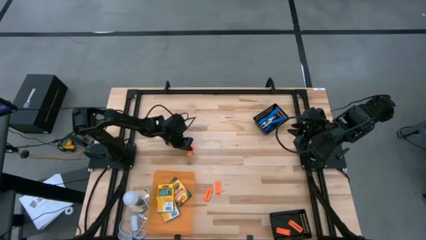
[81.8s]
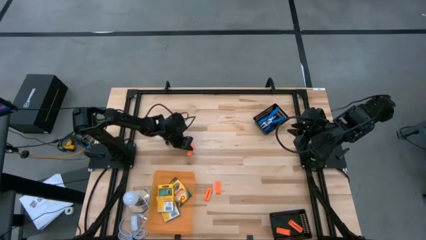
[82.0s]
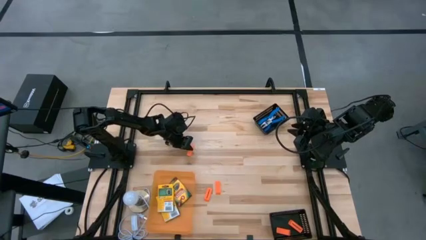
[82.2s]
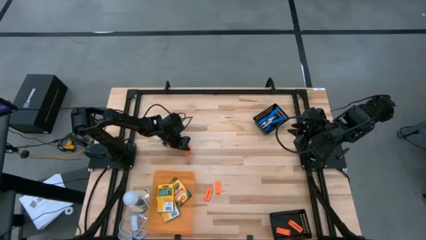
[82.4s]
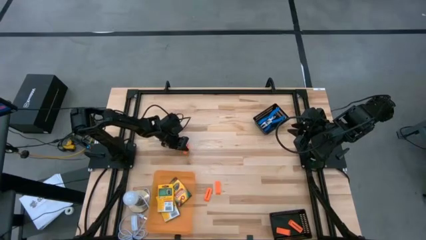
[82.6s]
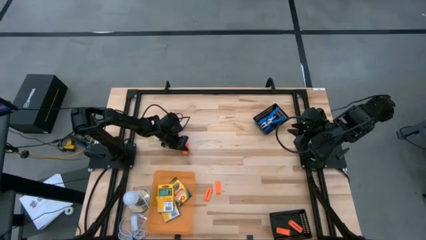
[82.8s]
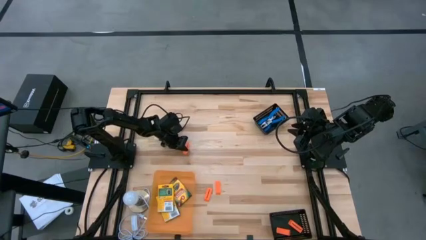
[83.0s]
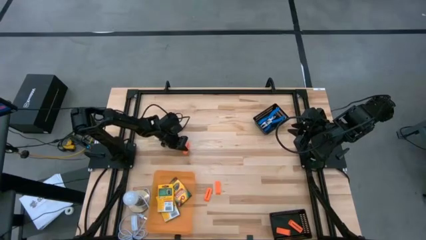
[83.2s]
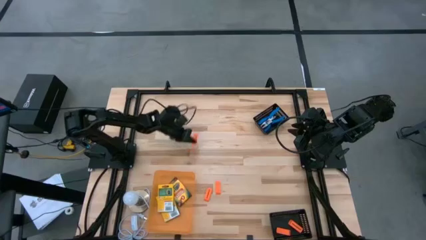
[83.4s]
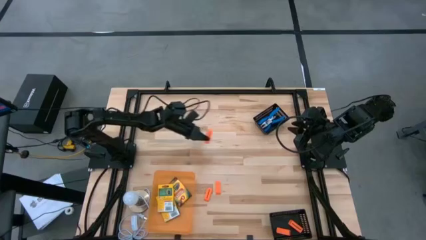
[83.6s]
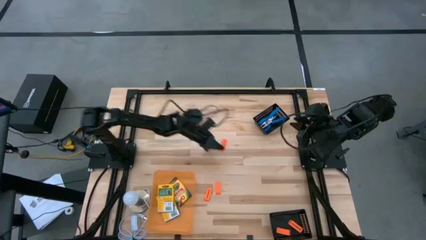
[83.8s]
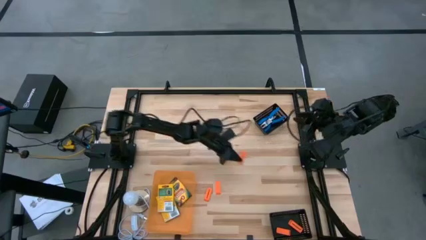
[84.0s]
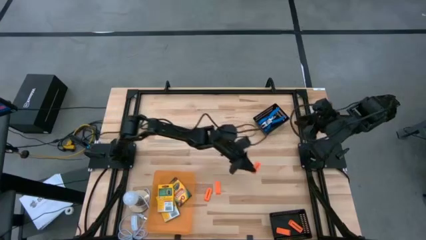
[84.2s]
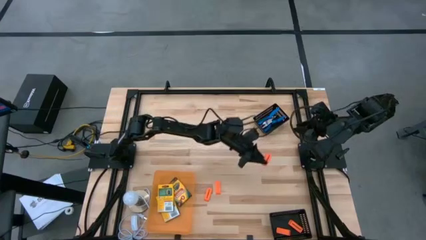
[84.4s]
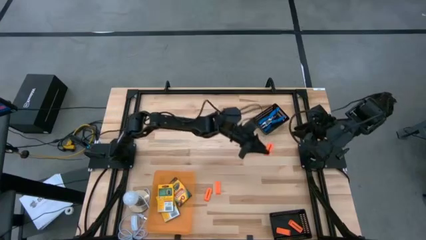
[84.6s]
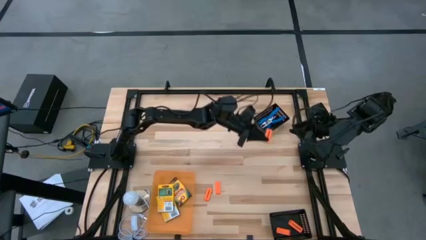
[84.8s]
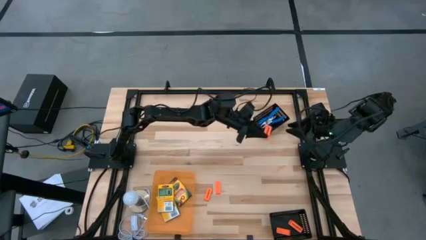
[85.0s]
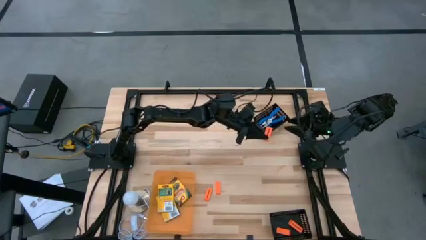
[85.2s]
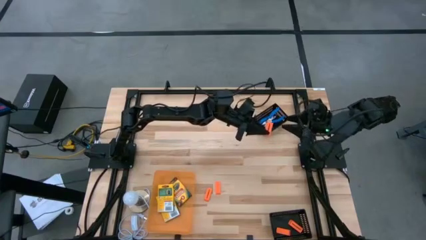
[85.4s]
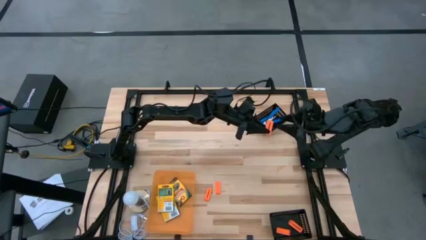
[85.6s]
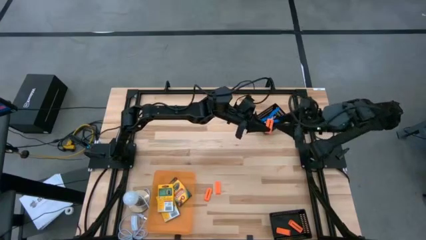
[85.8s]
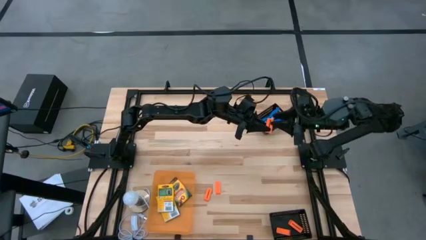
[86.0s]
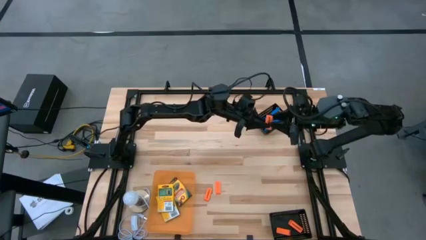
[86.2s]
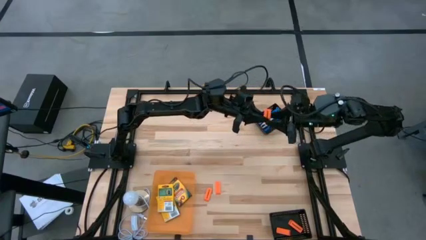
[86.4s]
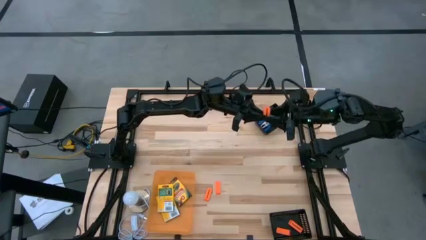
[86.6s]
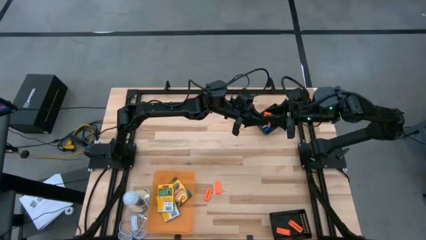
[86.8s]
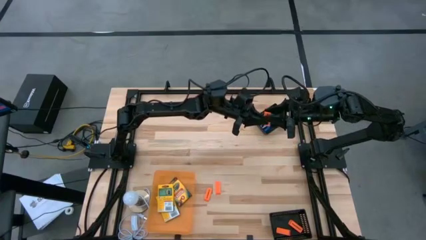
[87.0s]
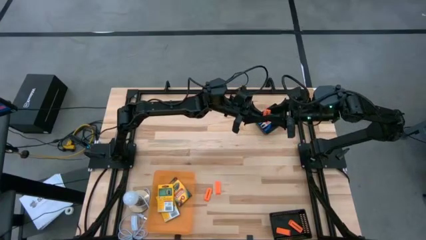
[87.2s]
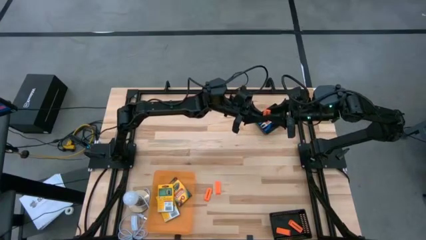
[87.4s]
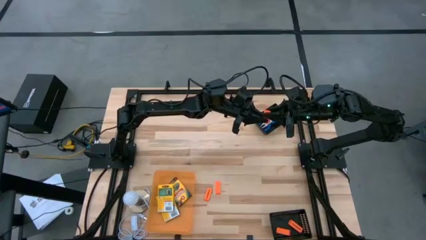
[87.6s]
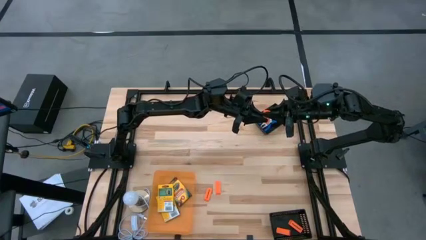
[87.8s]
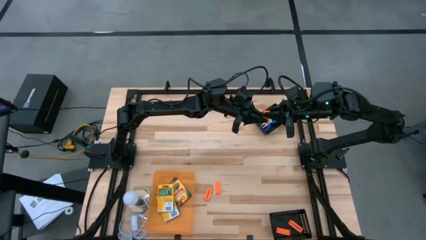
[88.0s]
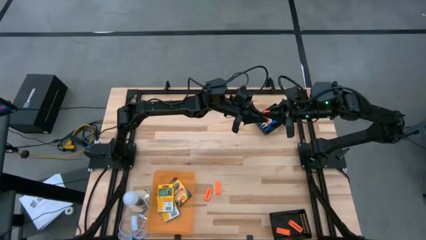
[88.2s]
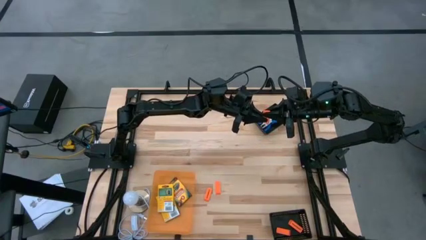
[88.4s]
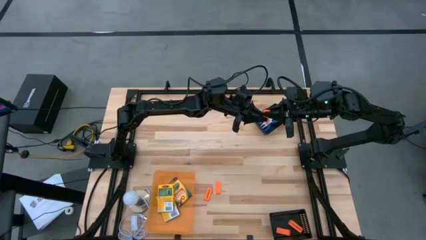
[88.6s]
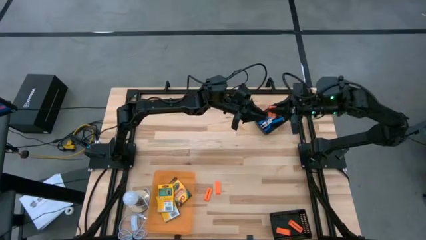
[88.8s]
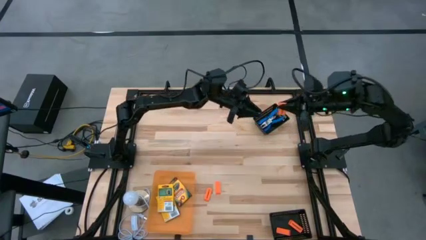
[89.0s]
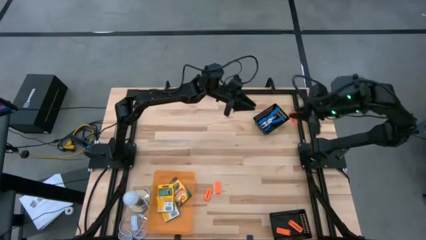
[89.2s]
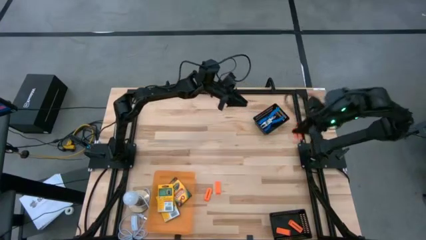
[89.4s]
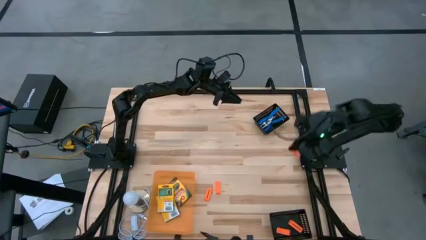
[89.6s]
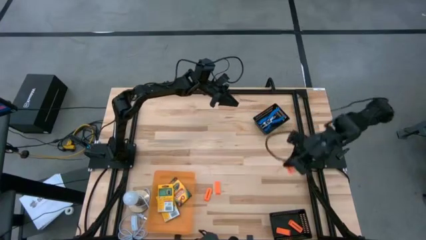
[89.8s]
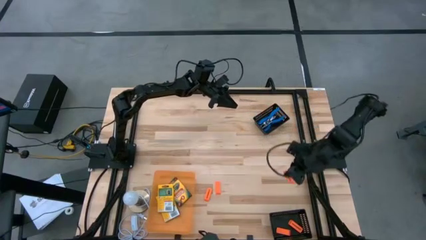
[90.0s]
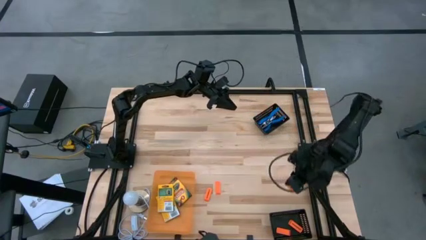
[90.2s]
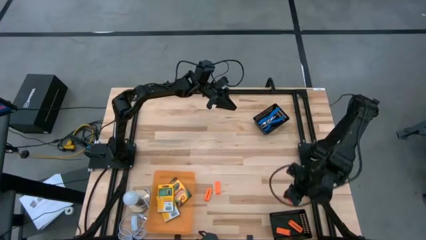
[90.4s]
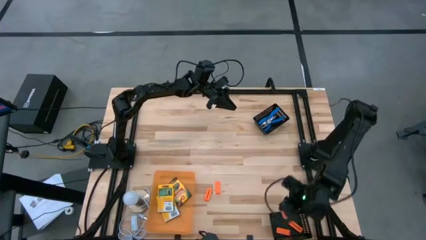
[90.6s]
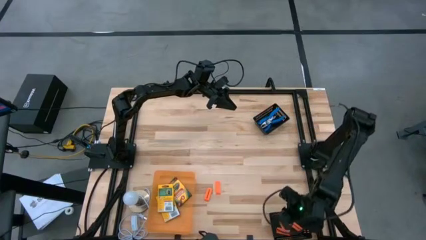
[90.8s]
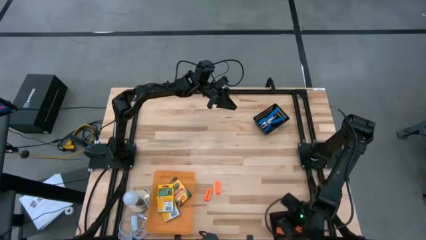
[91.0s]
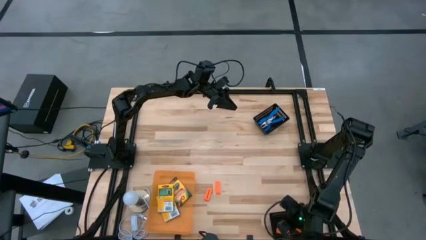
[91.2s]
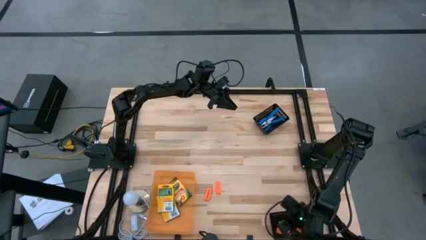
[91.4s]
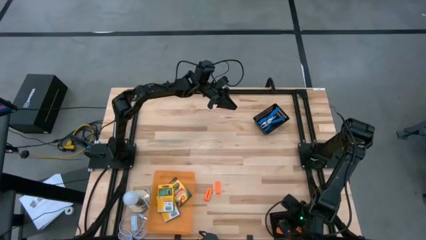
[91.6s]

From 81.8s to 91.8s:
Task: Pick & Place School Supplies
Put the orange eraser into the bottom black bin
